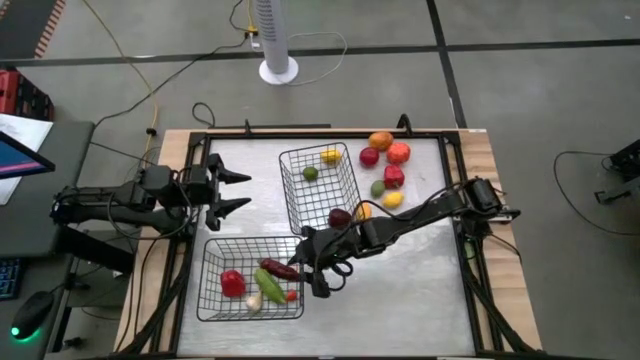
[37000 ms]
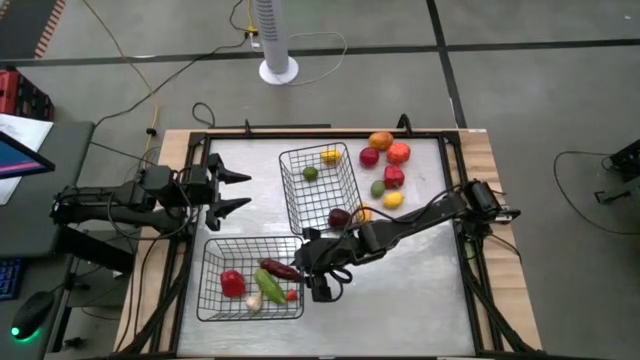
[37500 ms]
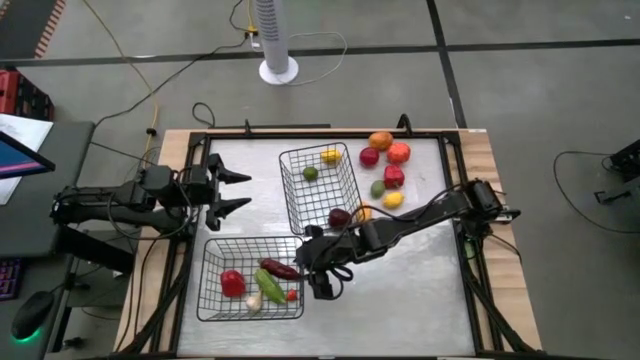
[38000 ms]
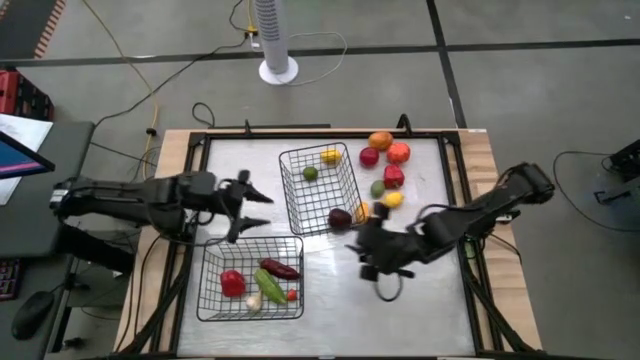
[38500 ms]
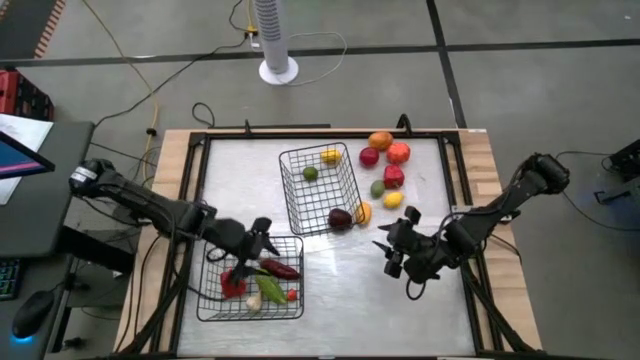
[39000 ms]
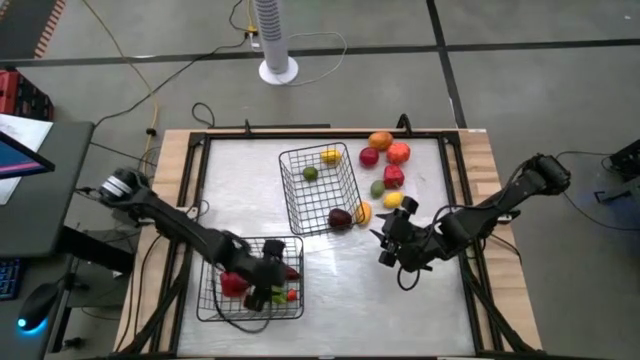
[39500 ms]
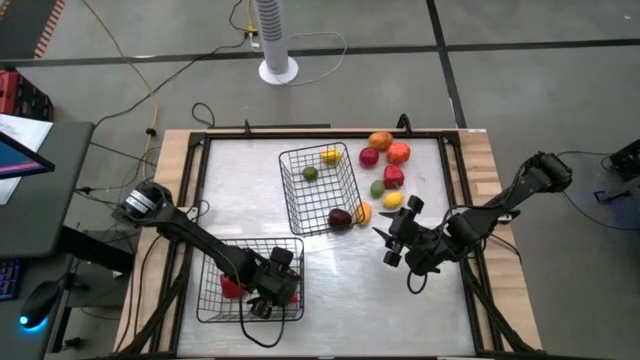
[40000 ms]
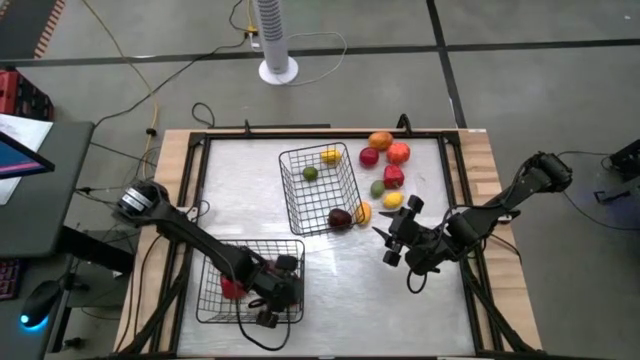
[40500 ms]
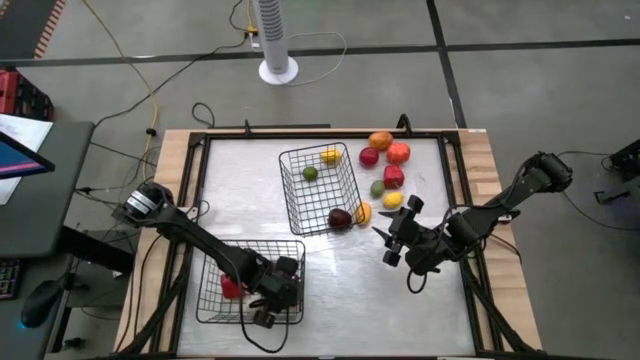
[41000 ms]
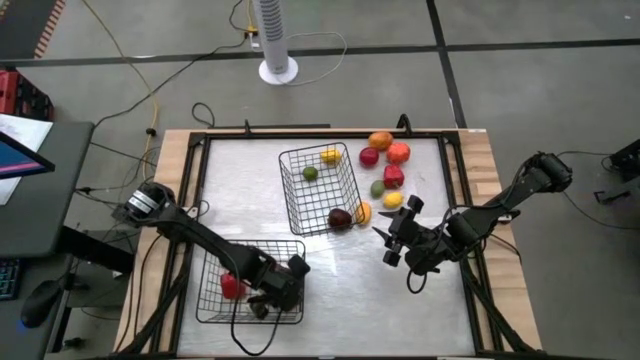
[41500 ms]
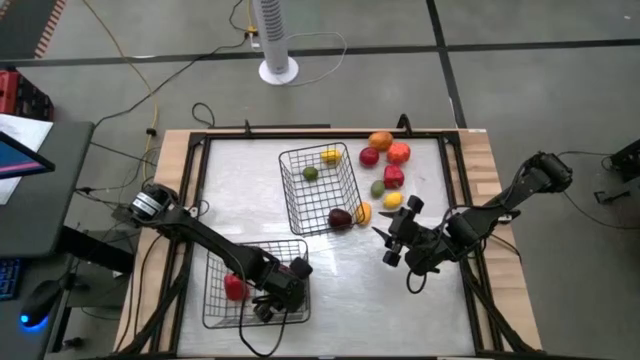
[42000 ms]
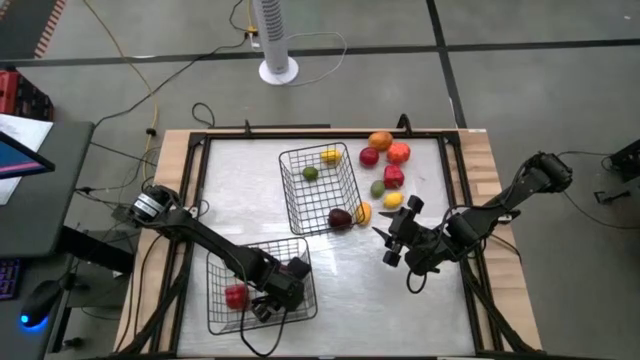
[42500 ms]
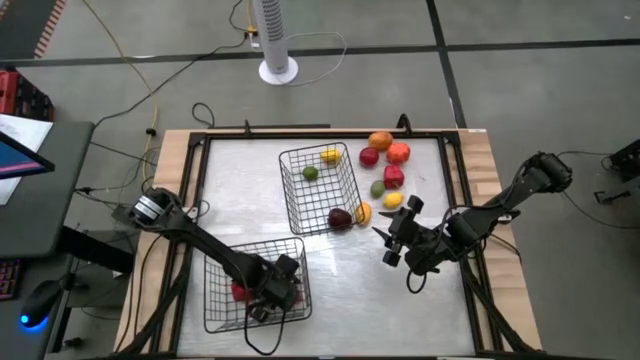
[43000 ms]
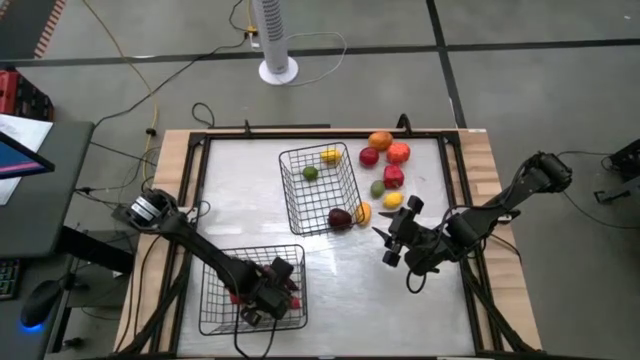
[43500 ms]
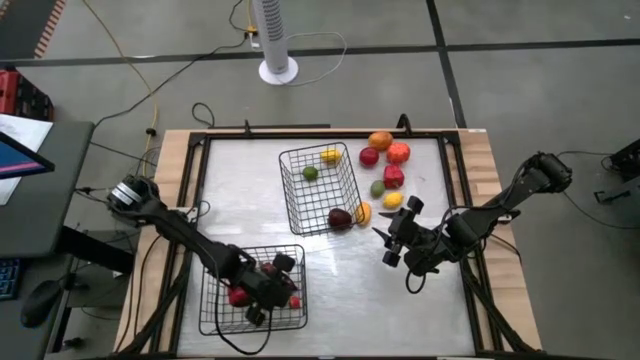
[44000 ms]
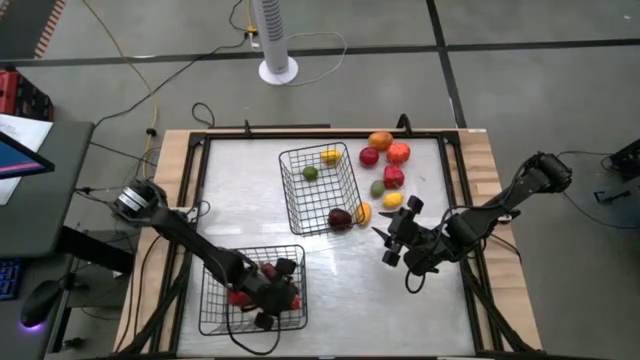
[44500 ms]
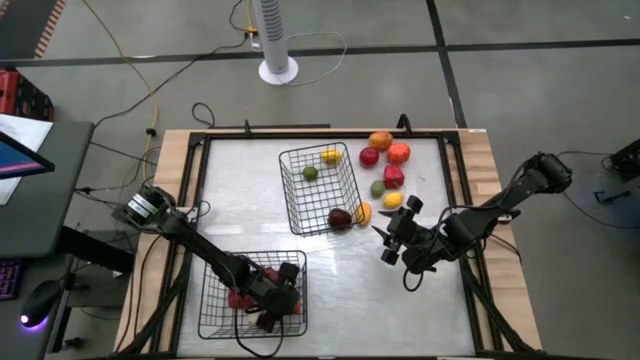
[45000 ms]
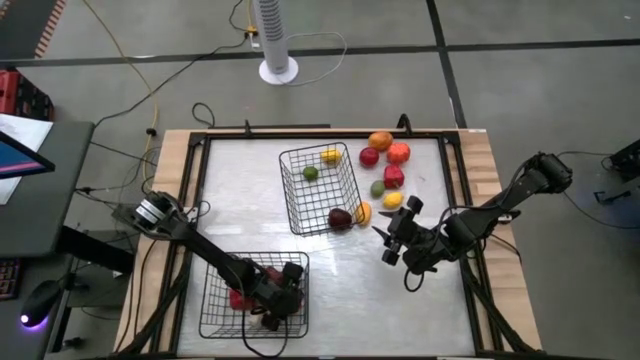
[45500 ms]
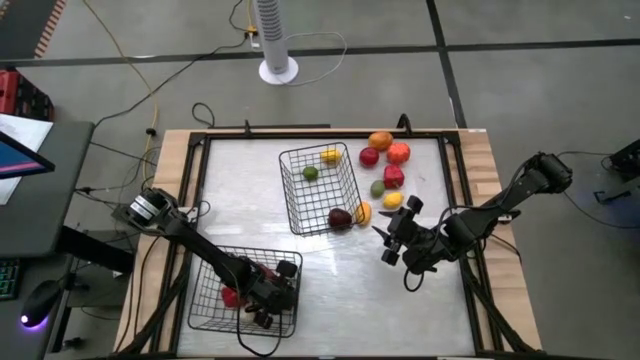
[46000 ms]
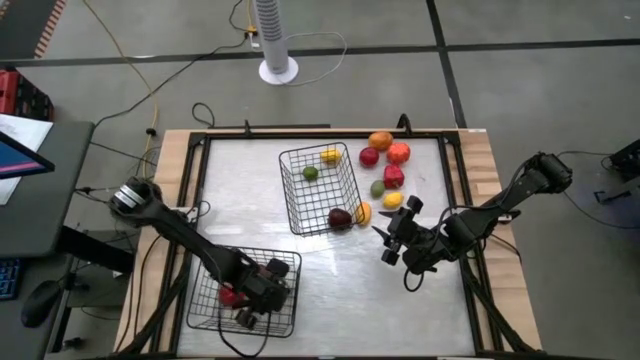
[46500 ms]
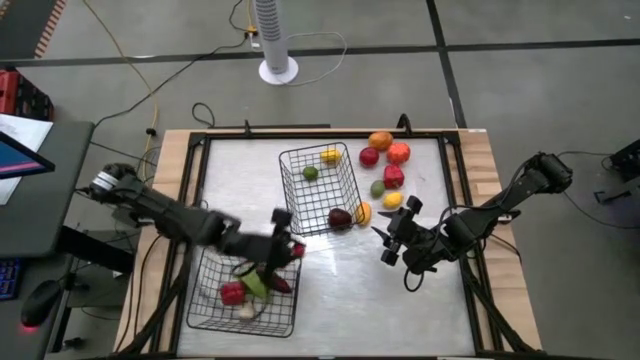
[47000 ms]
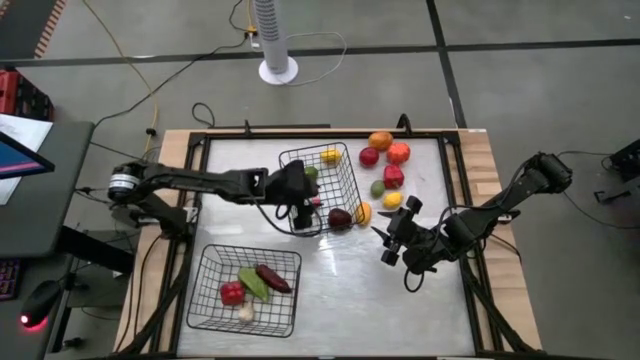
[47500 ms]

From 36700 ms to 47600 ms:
Task: Sort produce into baskets
Put the bottom red tomato into the top black wire basket

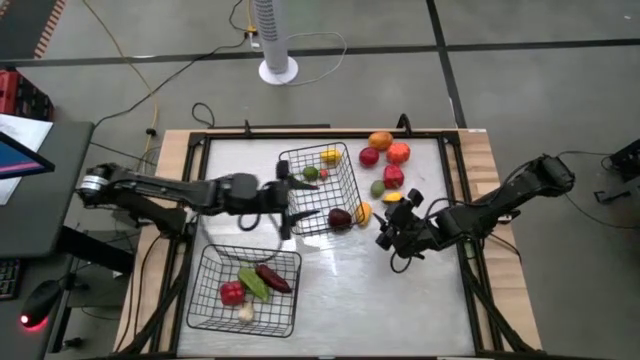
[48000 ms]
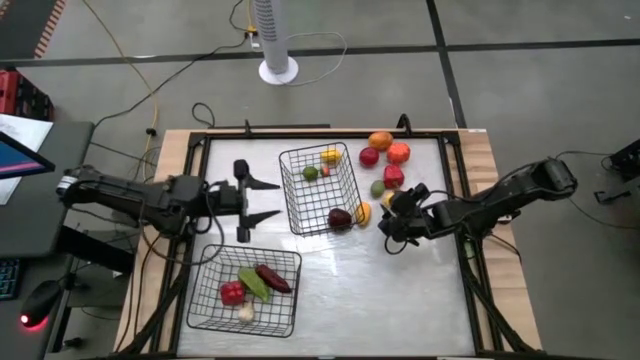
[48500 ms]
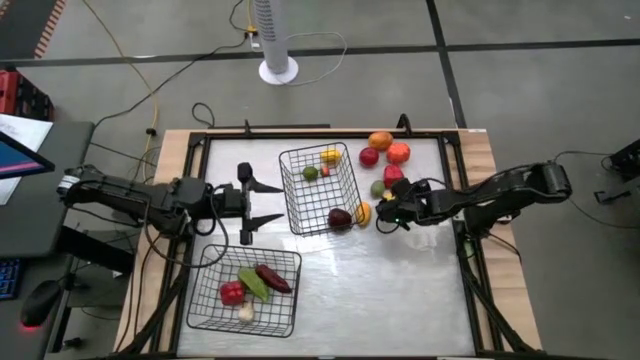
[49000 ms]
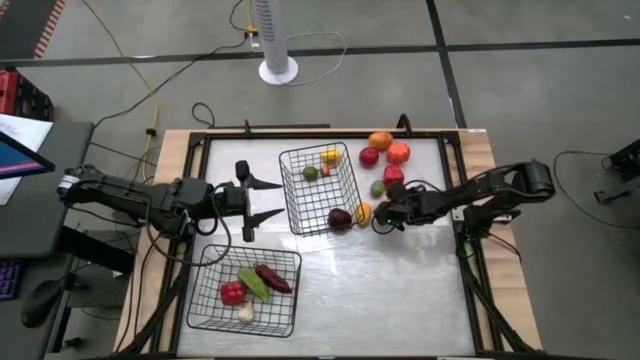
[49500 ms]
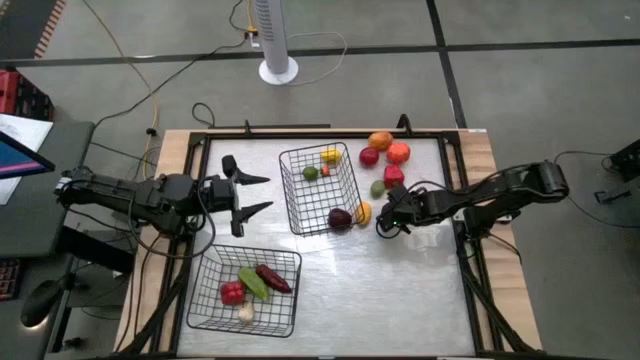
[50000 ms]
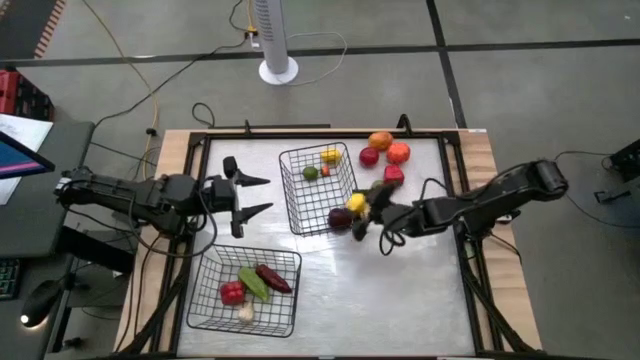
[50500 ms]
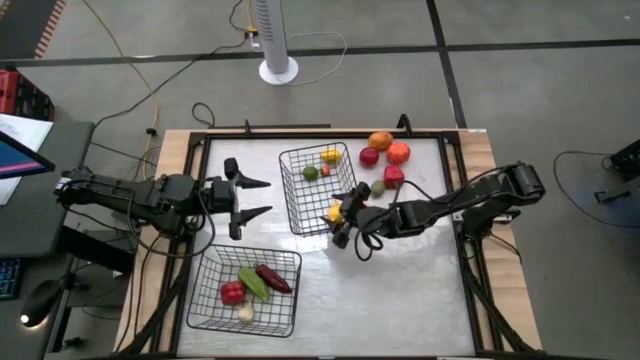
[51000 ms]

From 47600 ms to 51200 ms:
Put the bottom right yellow lemon into the top black wire basket

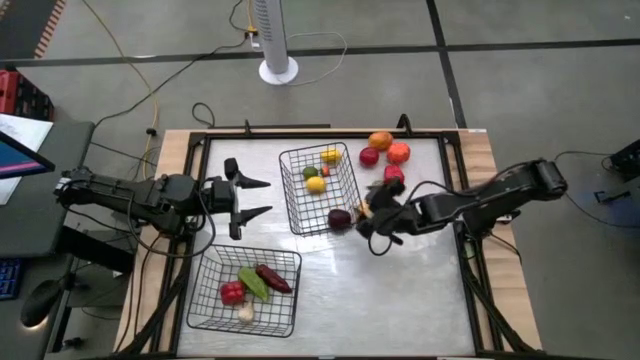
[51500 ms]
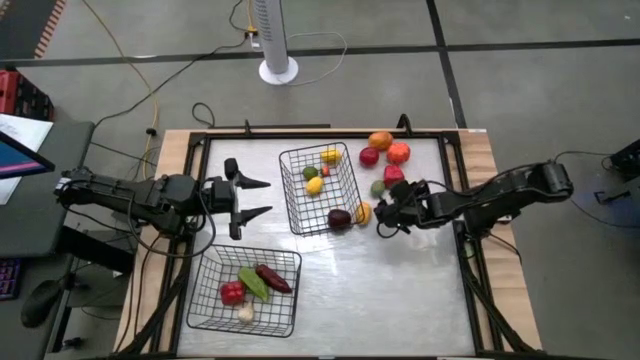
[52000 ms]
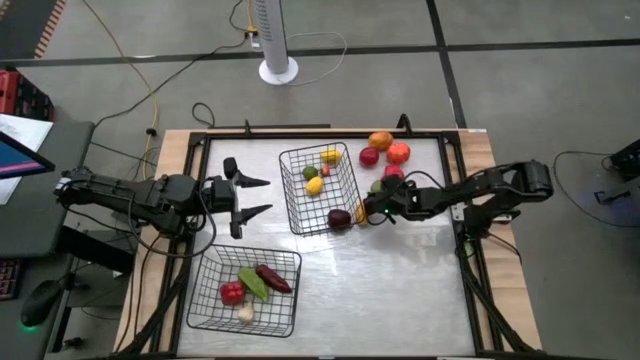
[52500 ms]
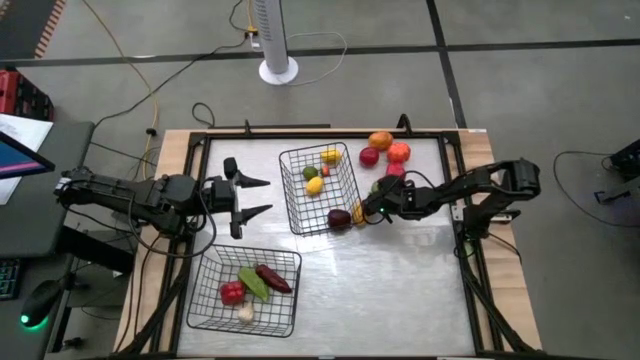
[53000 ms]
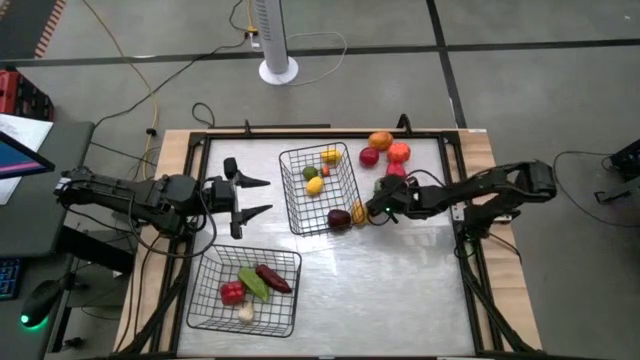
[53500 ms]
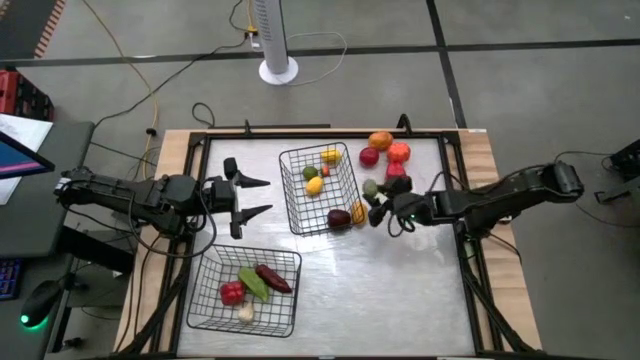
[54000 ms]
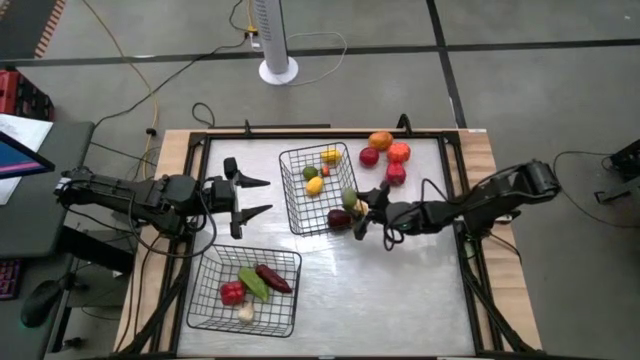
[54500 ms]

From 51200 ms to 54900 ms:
Put the green lime into the top black wire basket

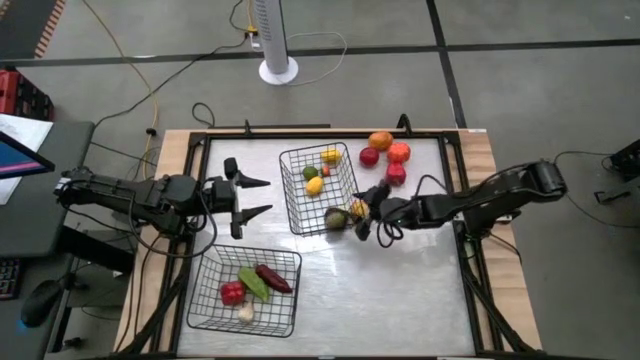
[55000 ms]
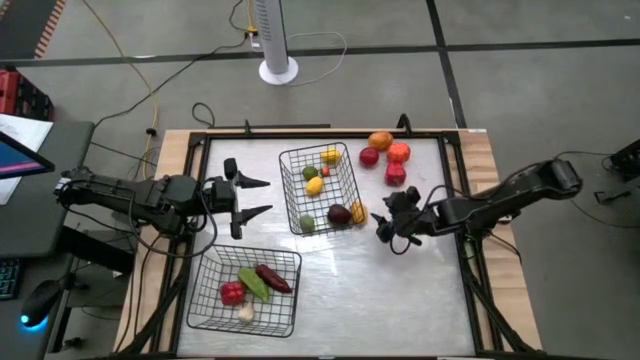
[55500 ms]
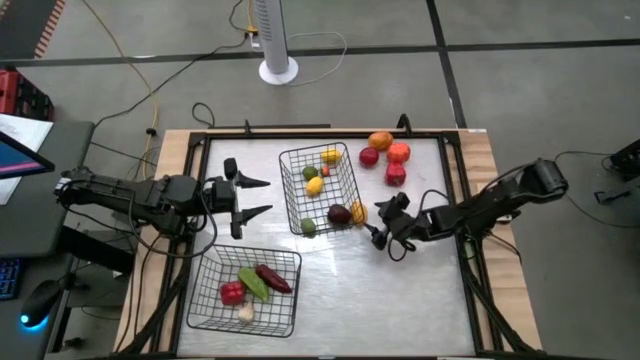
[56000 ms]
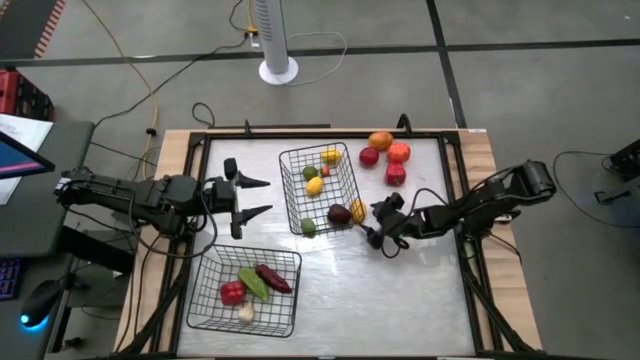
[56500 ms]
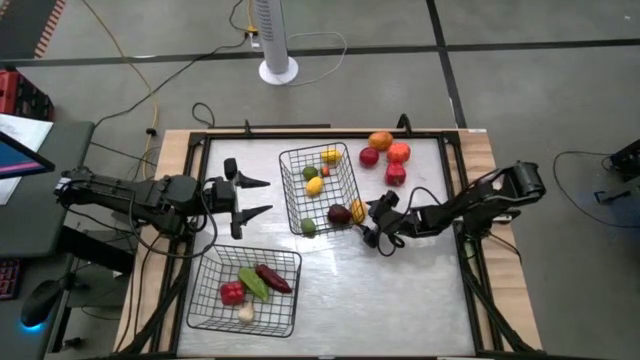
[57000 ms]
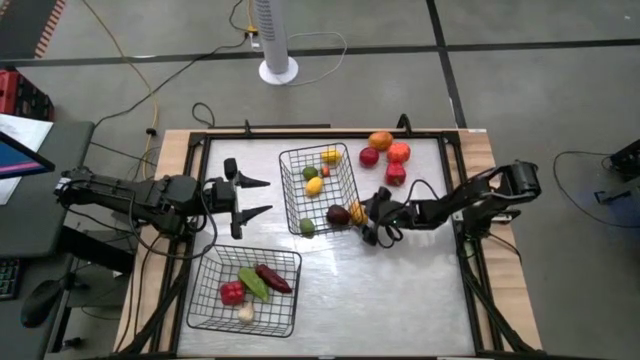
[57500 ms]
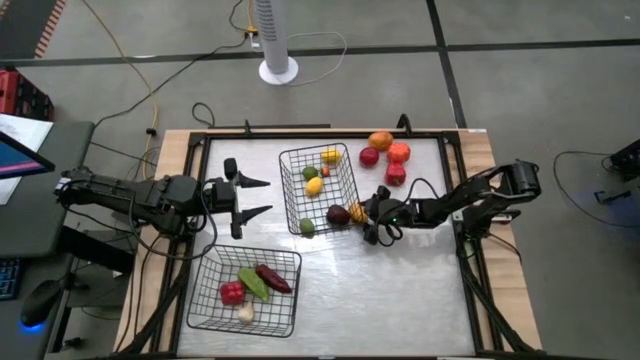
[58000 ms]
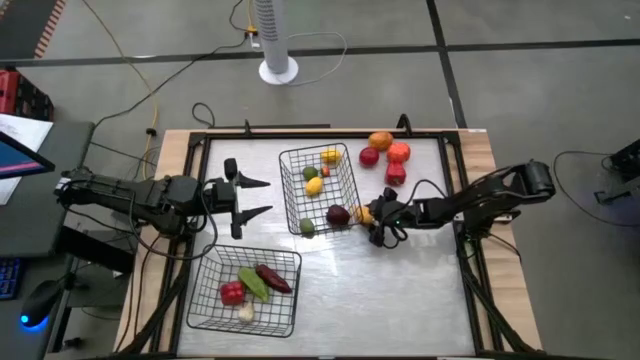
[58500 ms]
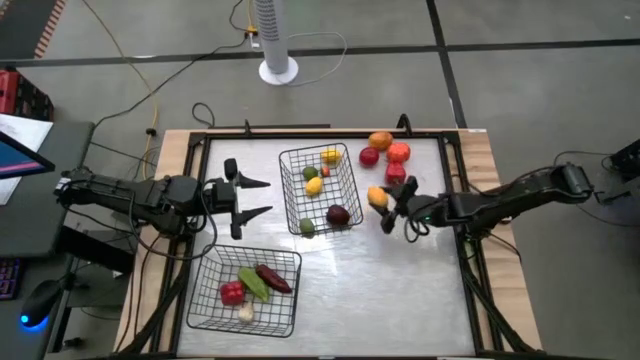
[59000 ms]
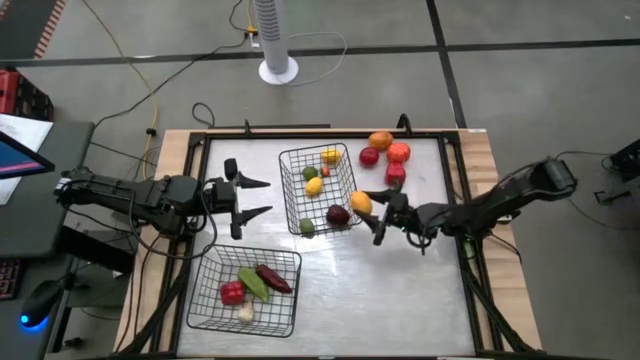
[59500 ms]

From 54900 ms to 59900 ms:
Put the bottom yellow lemon into the top black wire basket
